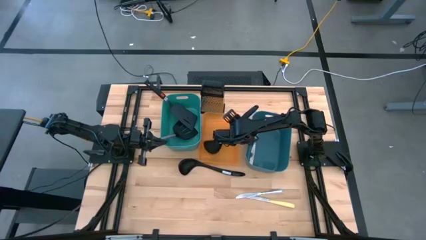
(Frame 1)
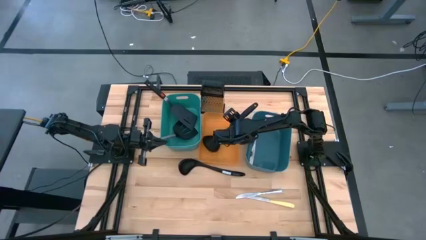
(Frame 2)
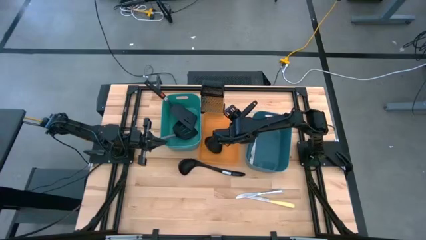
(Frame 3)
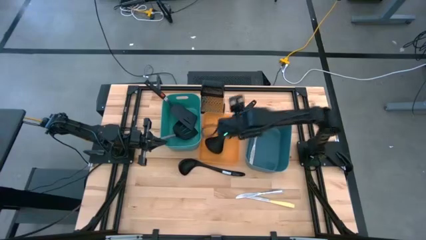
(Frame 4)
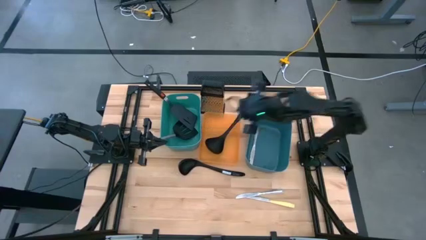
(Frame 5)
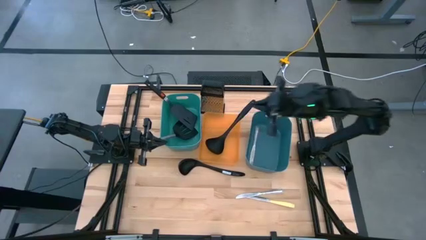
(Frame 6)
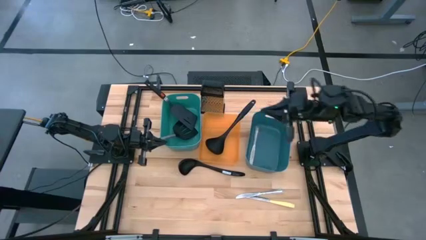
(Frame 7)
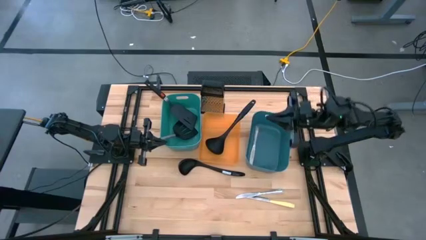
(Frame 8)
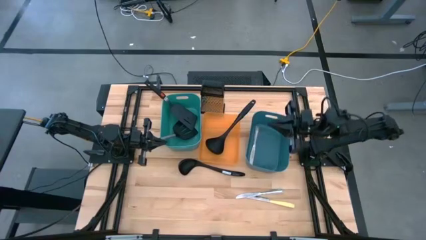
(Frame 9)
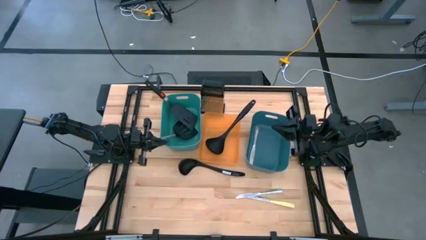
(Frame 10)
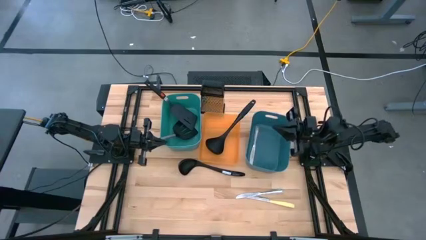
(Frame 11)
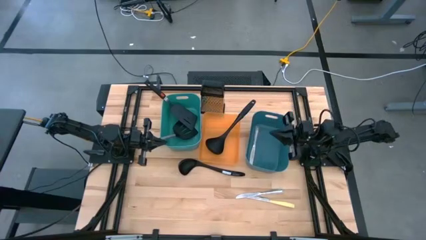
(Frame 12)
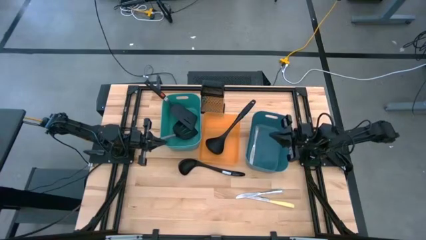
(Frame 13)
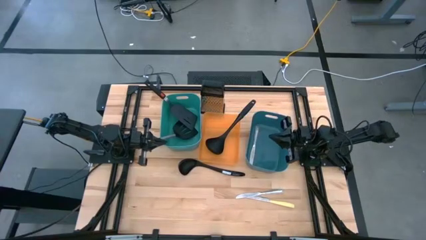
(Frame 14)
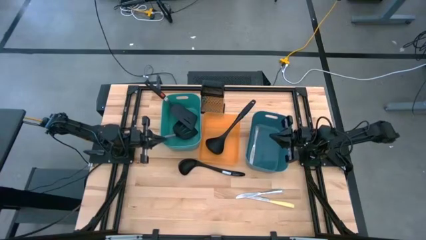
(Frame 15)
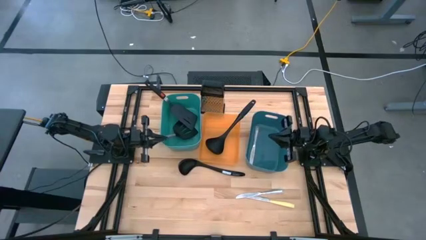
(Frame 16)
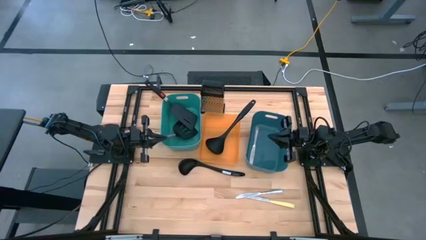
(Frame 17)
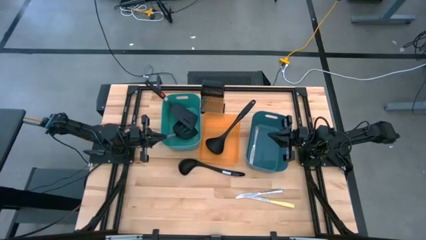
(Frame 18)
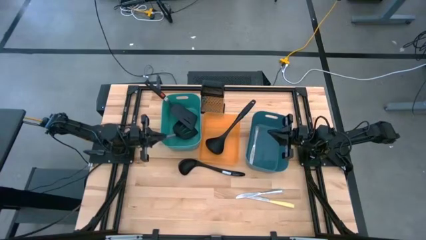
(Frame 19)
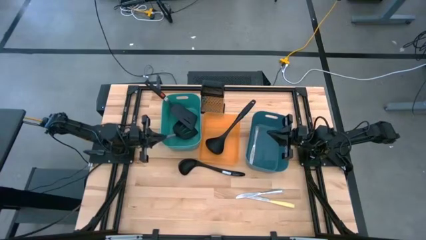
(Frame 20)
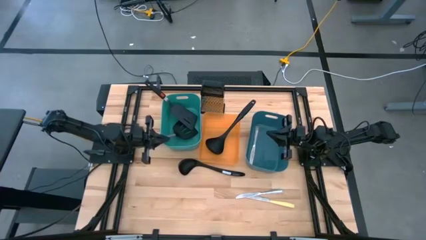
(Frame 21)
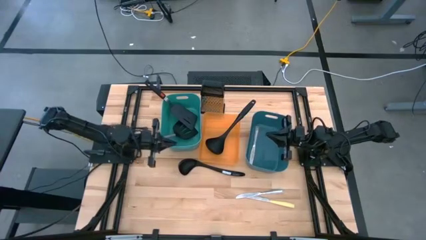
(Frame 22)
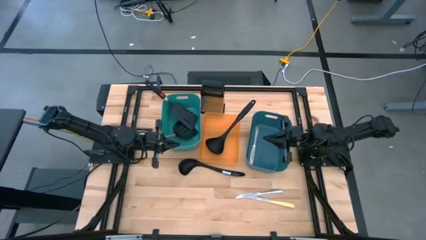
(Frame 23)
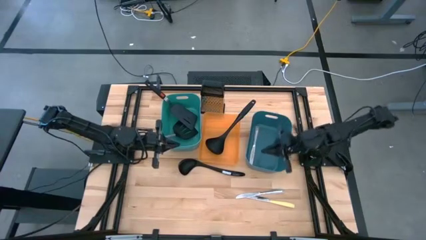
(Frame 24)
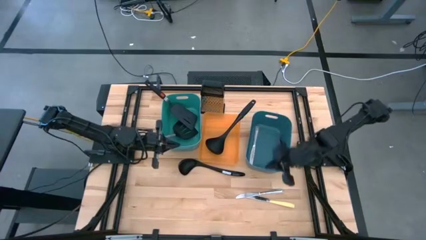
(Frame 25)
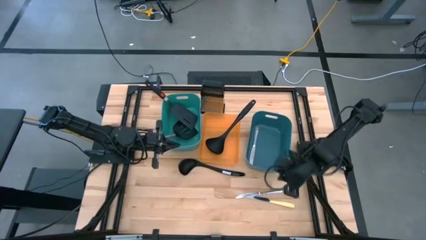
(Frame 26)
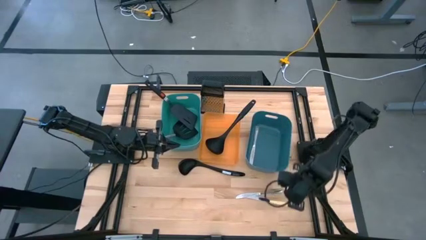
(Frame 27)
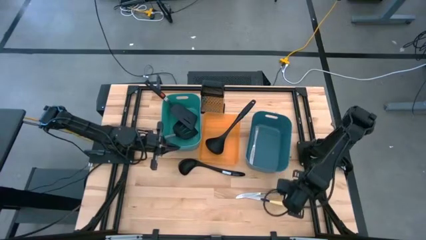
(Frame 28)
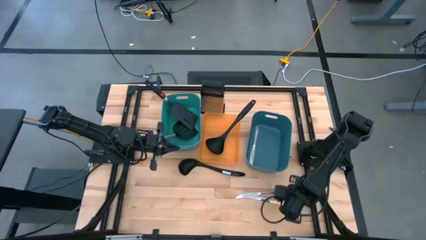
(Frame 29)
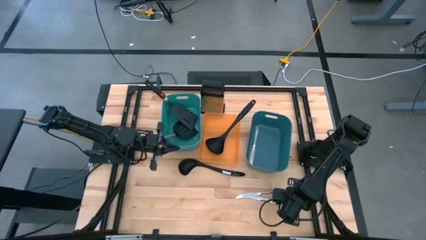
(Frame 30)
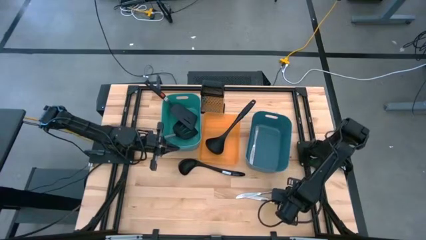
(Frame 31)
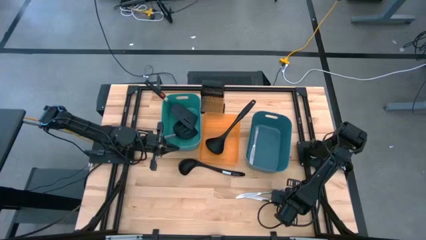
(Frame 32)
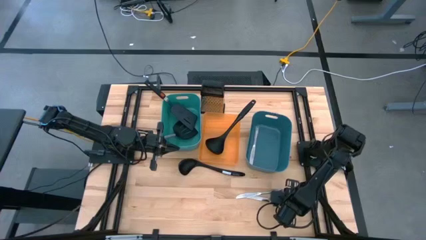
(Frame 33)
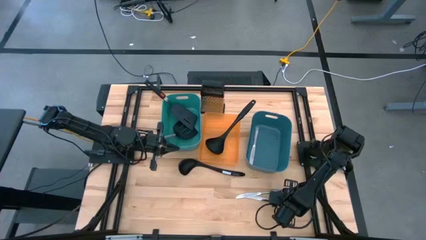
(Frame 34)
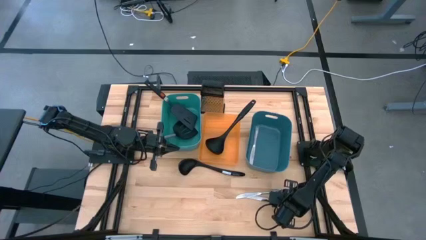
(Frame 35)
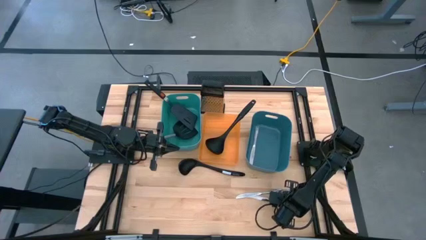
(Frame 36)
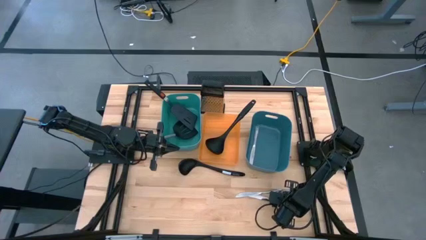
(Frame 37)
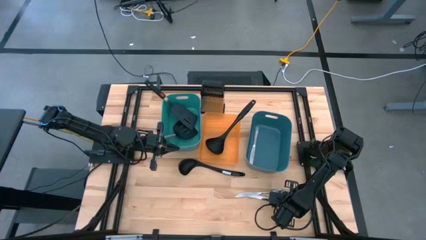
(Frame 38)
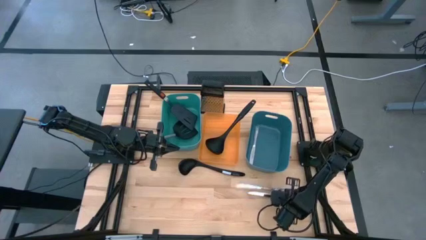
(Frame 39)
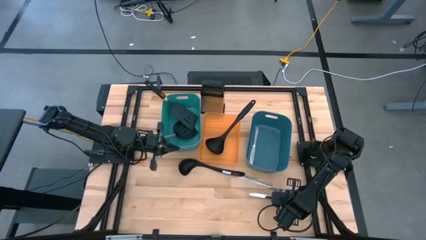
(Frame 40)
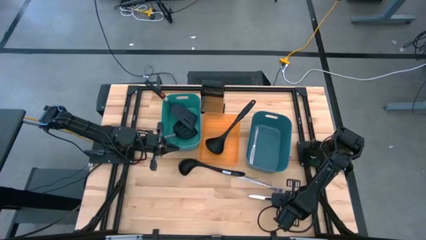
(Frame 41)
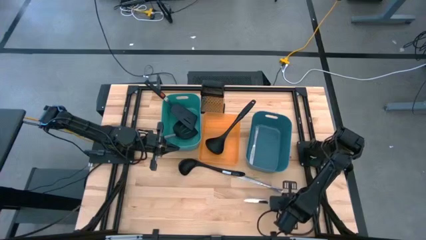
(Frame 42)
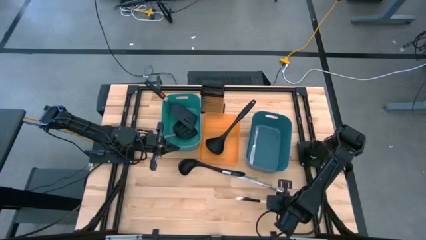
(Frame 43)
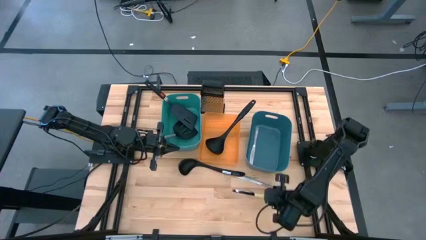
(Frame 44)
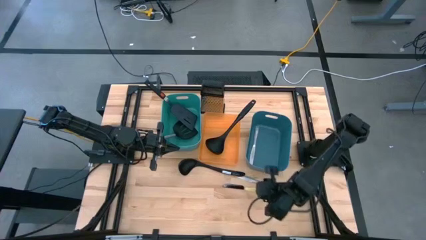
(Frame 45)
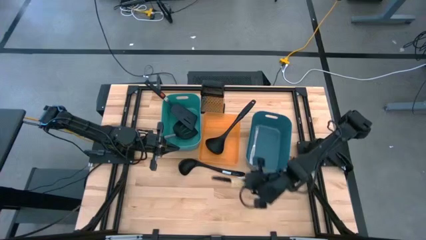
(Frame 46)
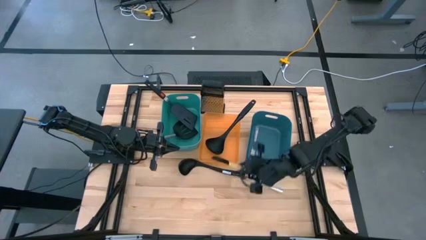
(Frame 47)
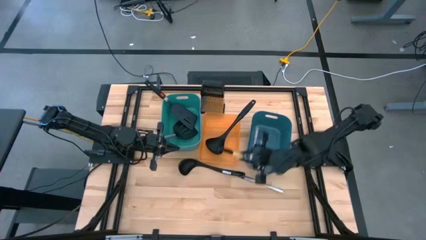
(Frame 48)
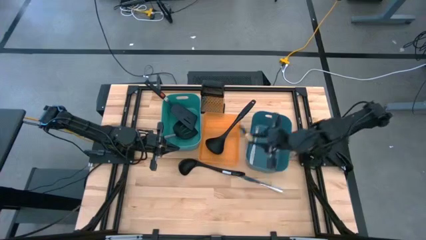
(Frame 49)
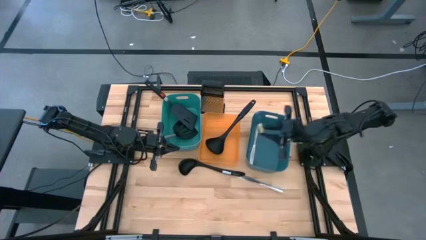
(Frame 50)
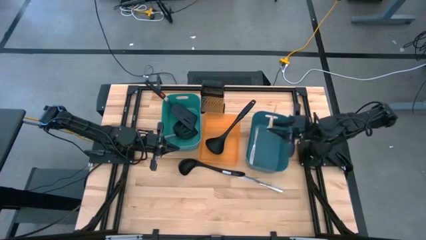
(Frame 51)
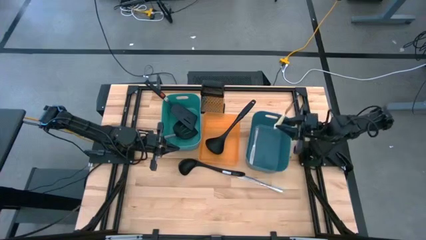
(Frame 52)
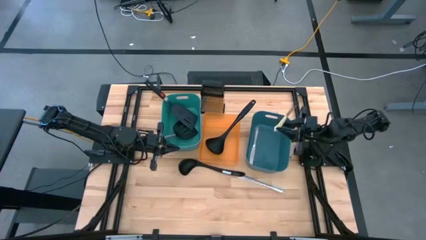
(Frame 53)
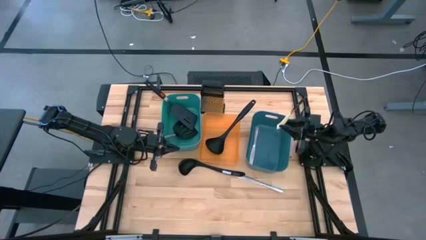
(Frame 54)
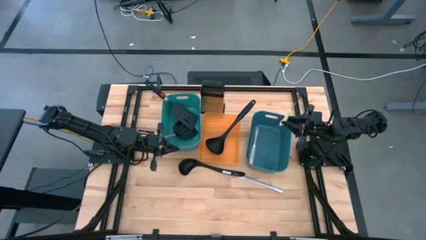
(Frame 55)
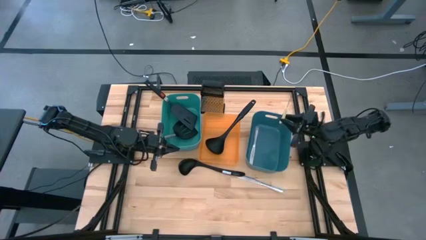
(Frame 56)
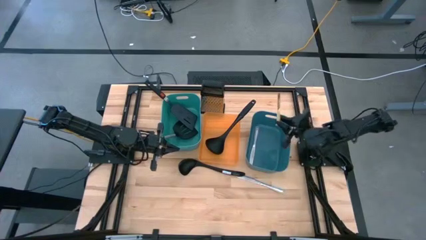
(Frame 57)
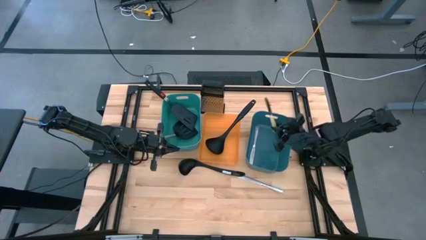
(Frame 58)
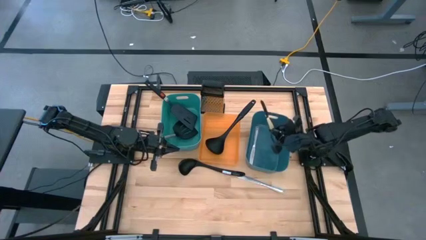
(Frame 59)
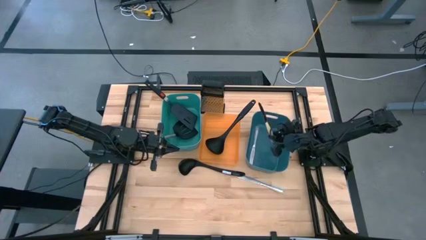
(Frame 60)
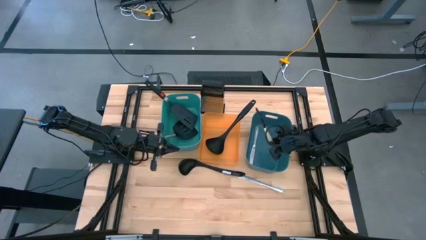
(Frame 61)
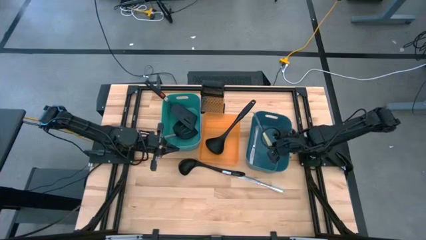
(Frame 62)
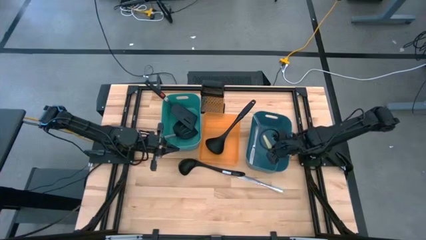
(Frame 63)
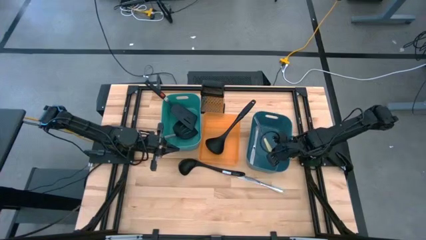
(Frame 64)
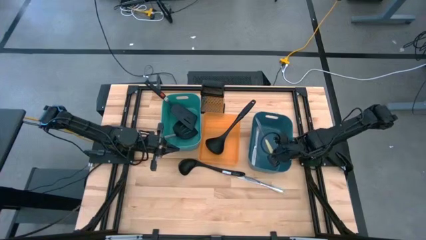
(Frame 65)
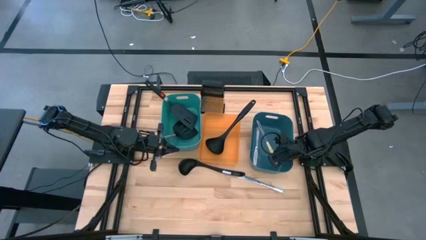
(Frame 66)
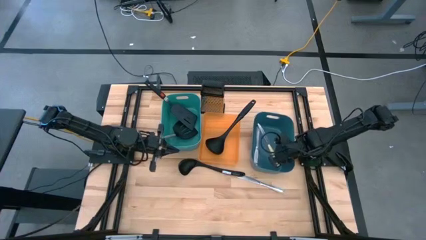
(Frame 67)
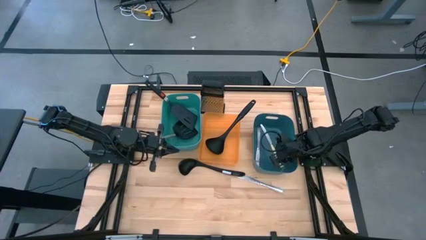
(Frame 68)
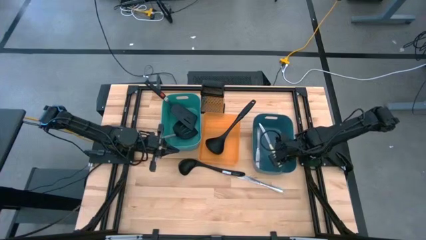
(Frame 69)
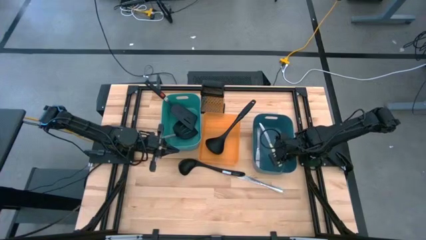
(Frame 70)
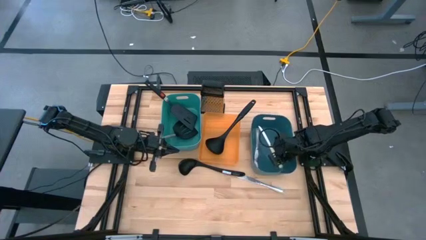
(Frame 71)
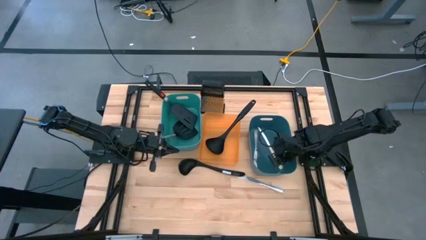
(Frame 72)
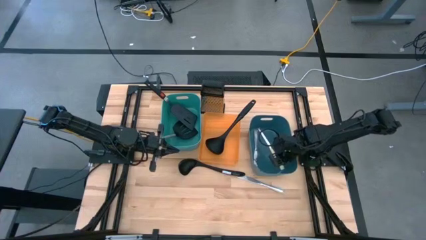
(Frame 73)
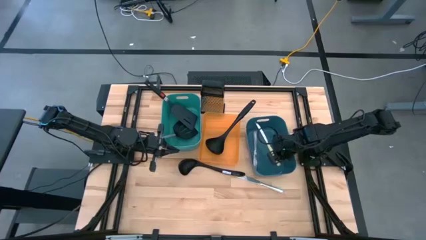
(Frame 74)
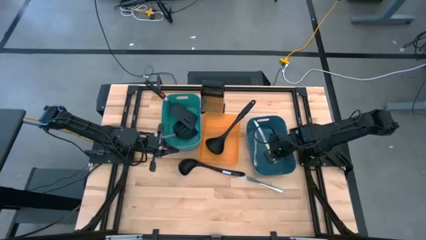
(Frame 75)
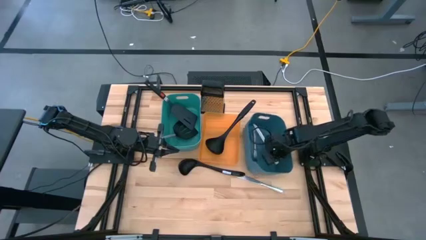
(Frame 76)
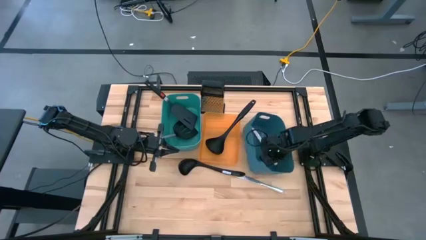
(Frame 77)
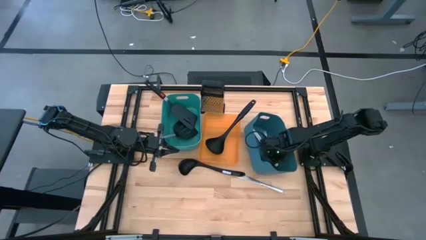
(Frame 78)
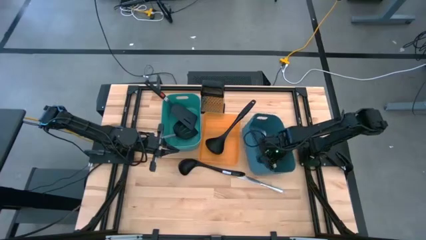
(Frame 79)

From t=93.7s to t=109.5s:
Task: Pick & Place Kitchen Items
Put the yellow table knife into the blue bin

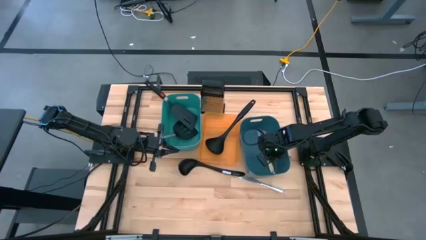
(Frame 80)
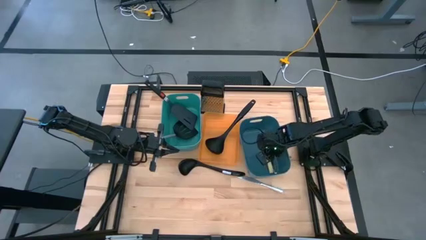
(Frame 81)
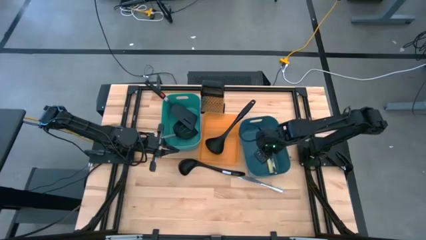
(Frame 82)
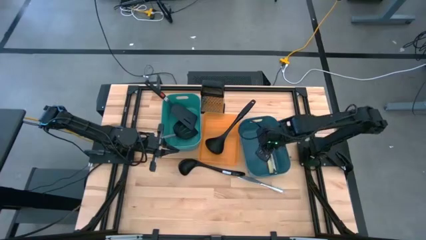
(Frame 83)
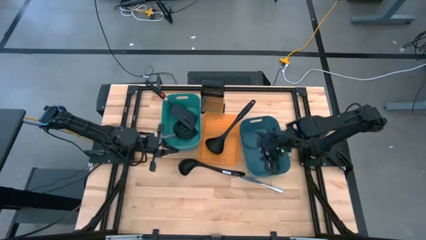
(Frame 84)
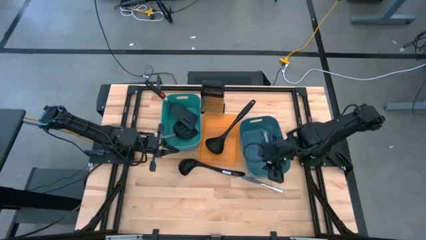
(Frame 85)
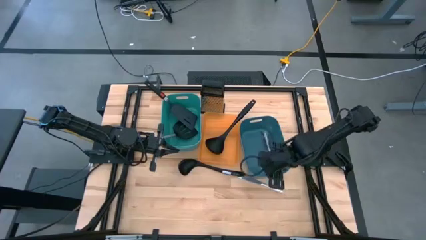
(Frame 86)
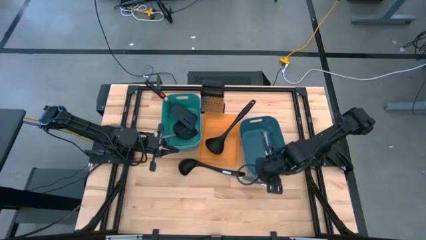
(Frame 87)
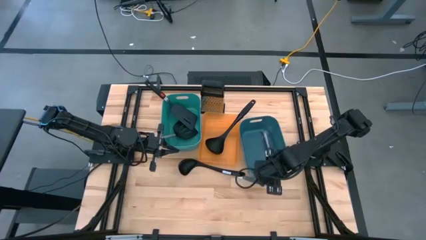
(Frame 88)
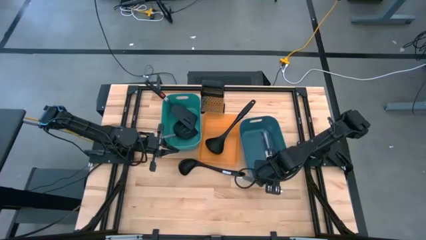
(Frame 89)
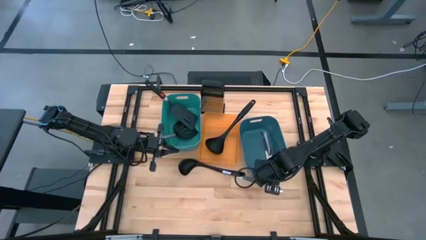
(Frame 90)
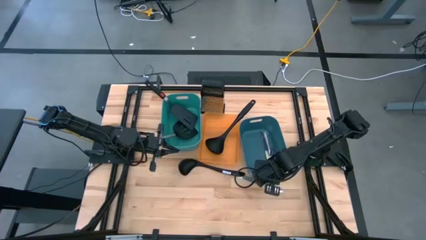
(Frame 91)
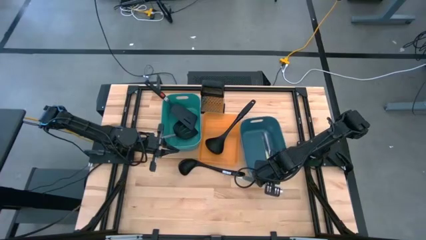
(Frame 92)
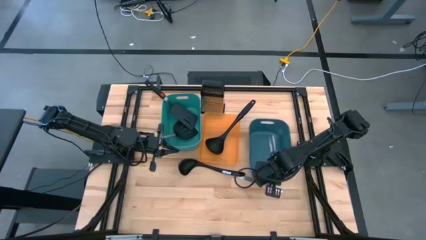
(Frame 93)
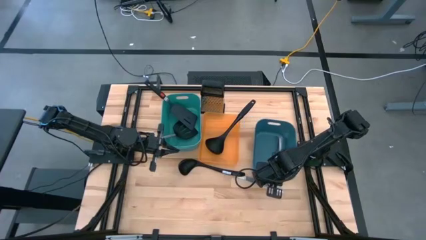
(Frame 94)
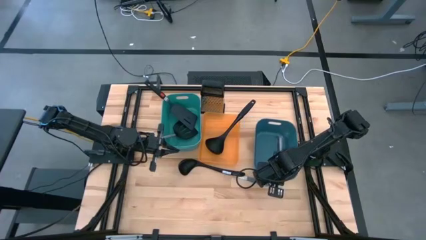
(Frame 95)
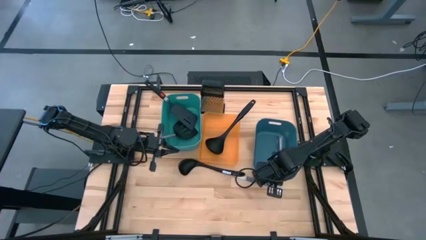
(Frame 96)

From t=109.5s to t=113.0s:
Adjust the blue bin
